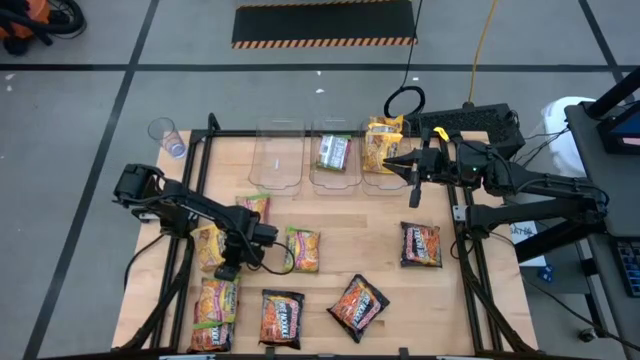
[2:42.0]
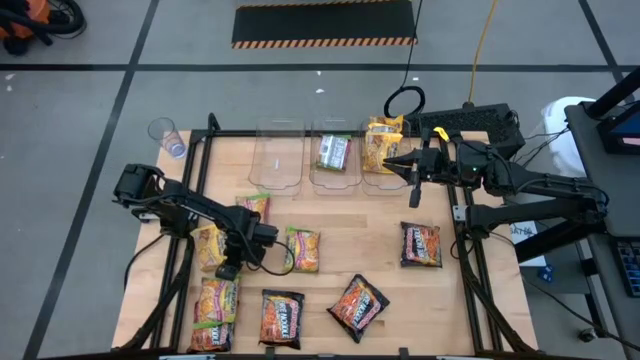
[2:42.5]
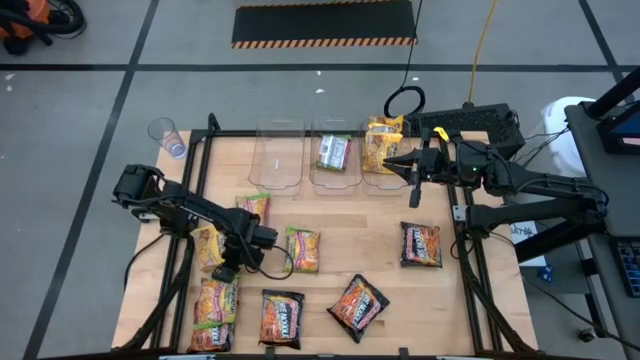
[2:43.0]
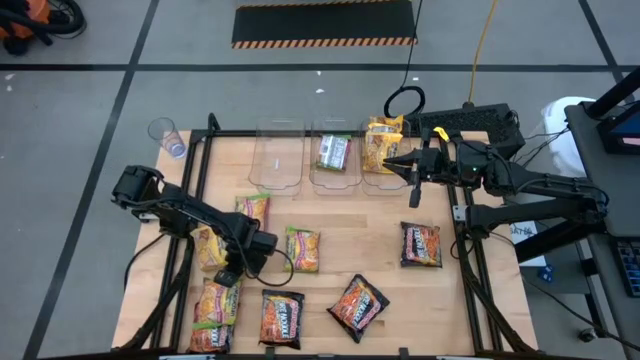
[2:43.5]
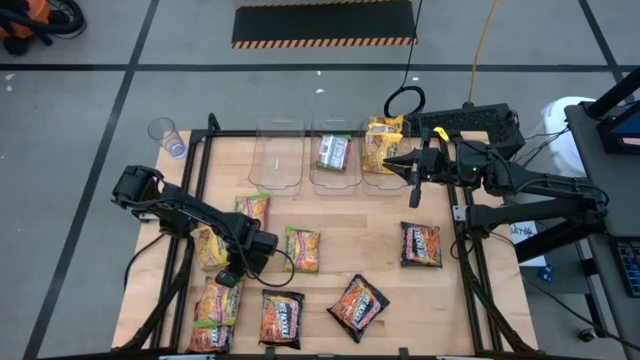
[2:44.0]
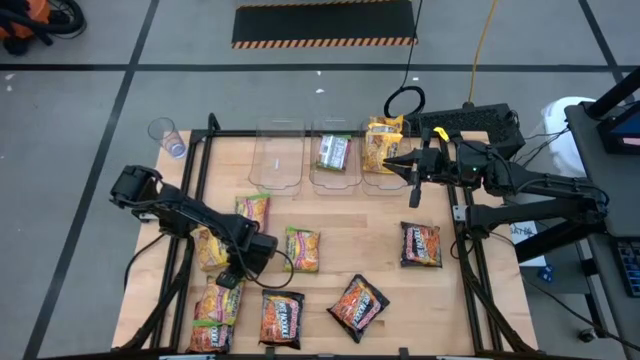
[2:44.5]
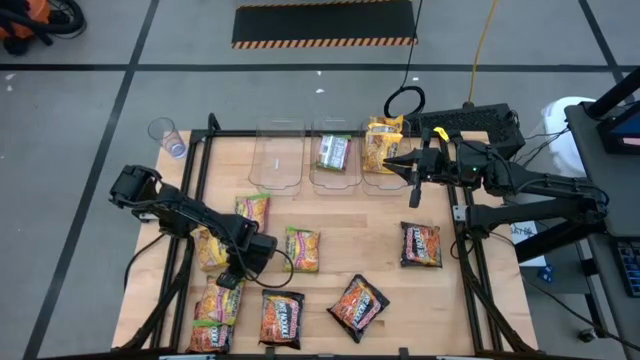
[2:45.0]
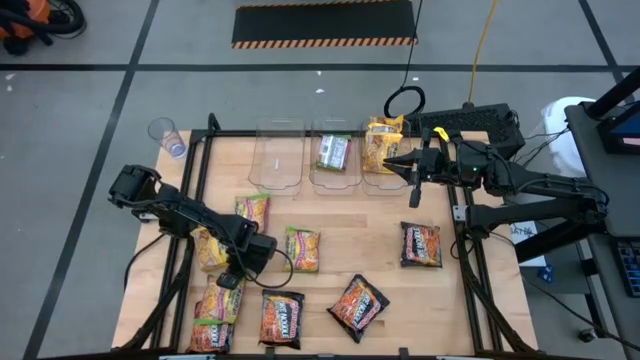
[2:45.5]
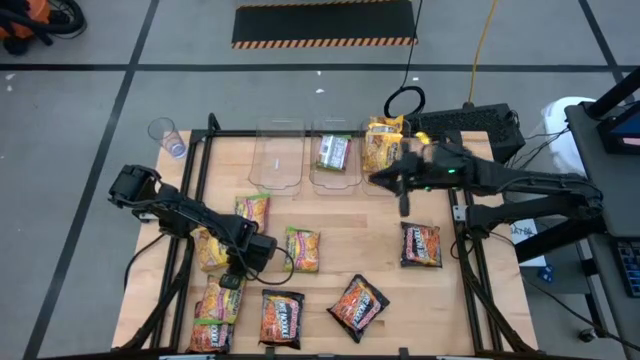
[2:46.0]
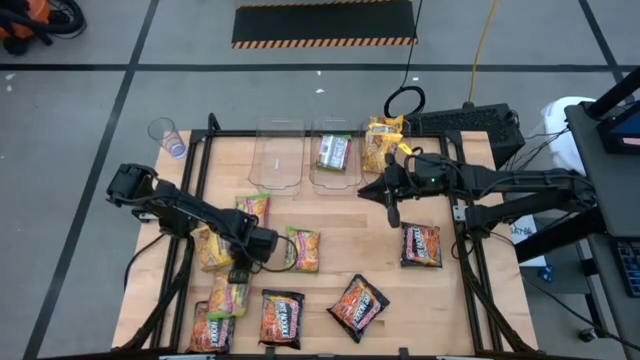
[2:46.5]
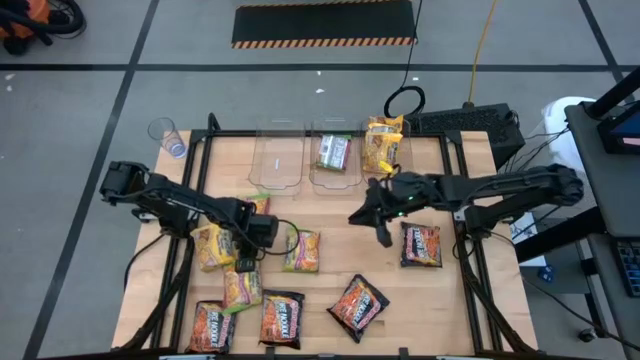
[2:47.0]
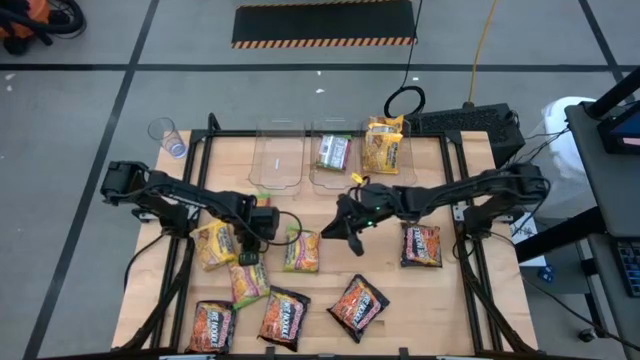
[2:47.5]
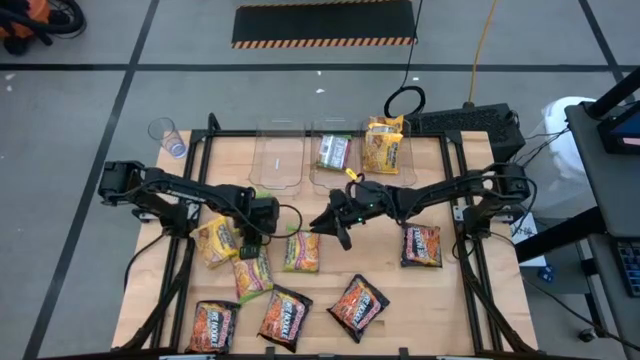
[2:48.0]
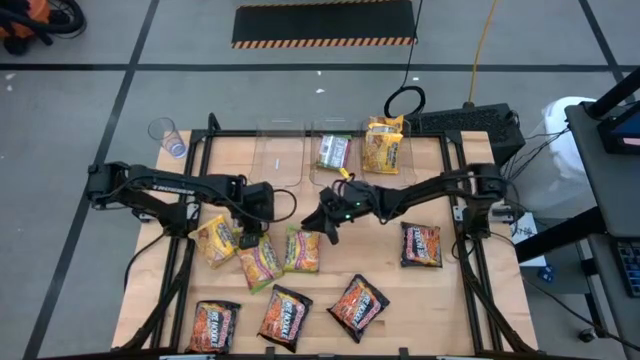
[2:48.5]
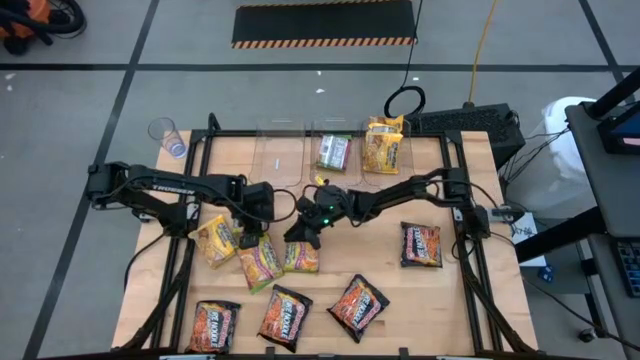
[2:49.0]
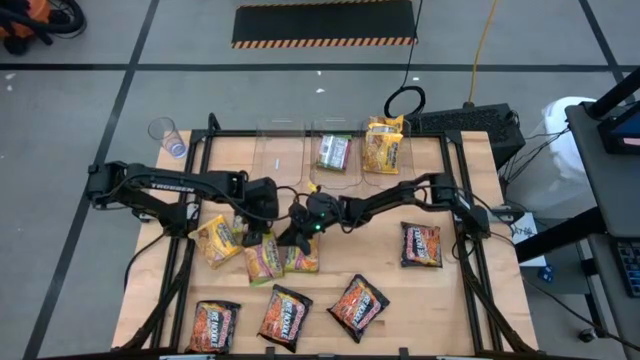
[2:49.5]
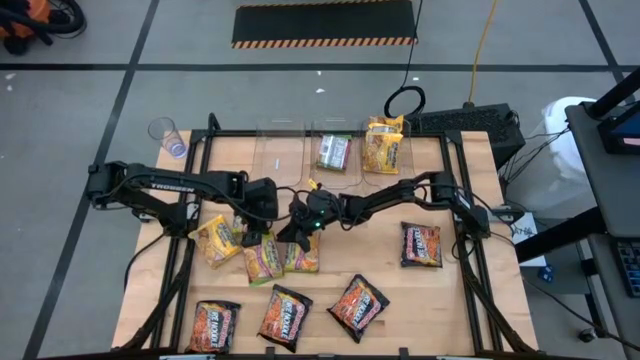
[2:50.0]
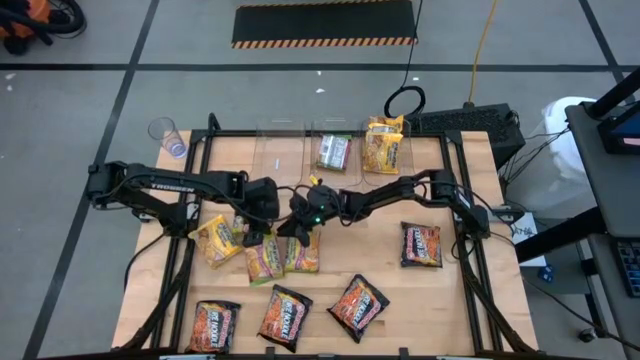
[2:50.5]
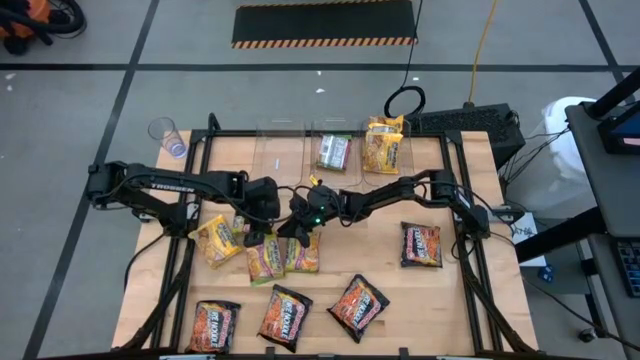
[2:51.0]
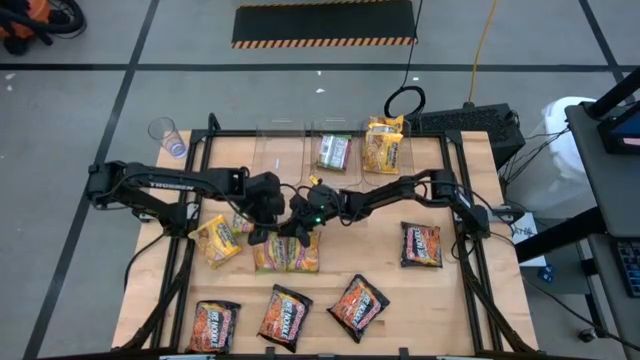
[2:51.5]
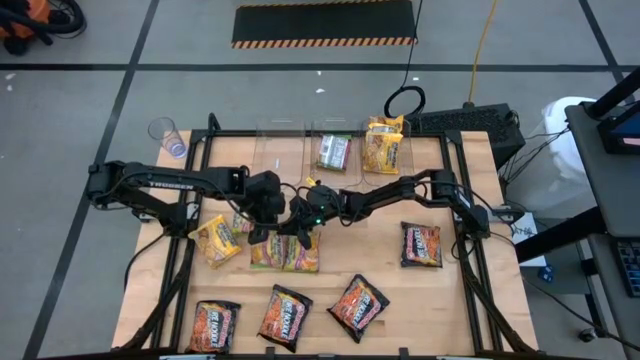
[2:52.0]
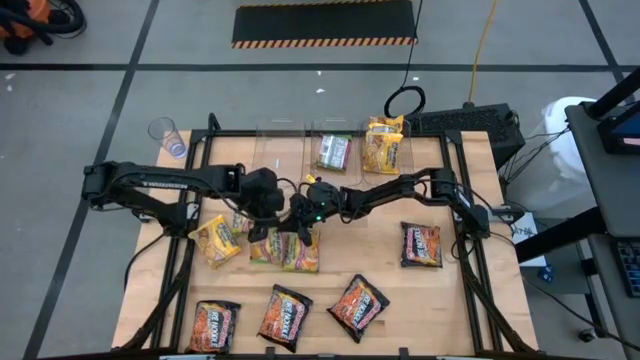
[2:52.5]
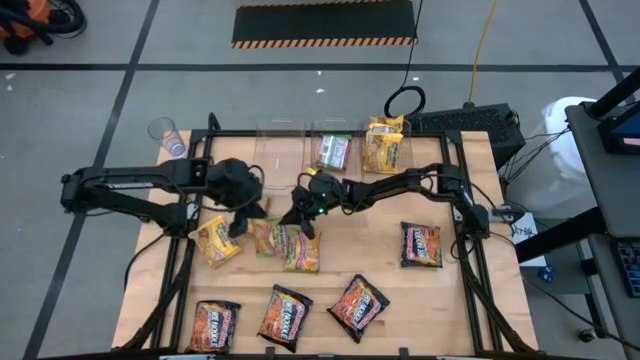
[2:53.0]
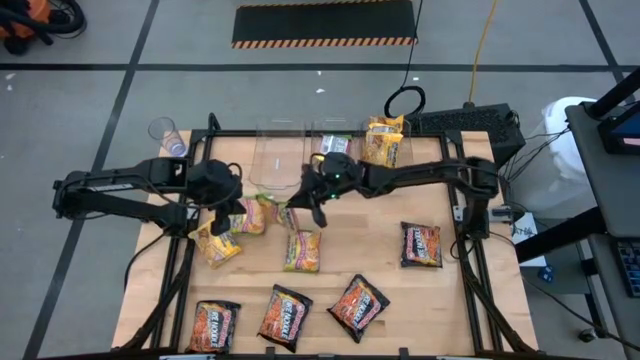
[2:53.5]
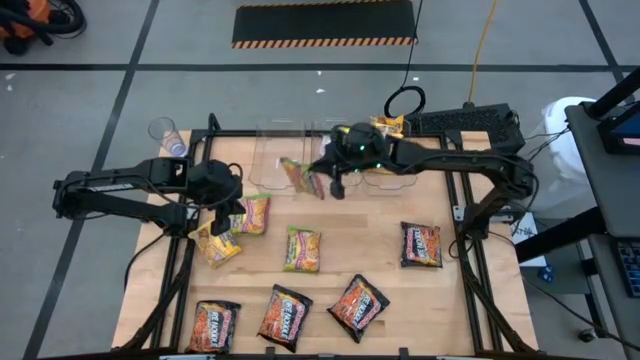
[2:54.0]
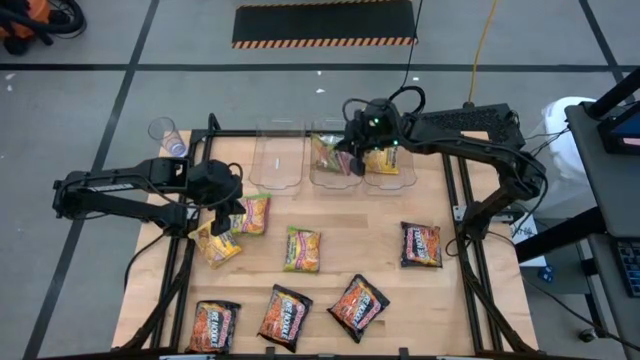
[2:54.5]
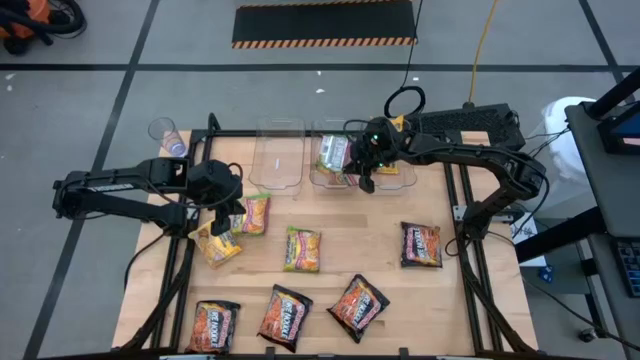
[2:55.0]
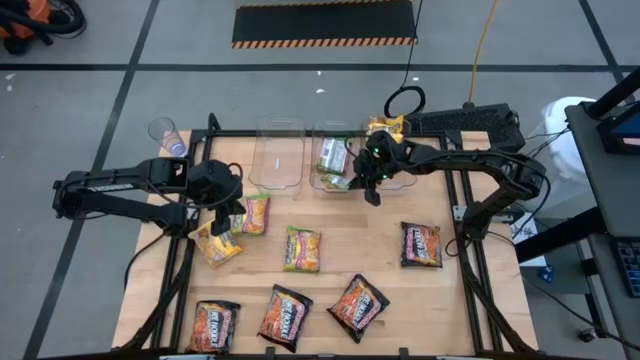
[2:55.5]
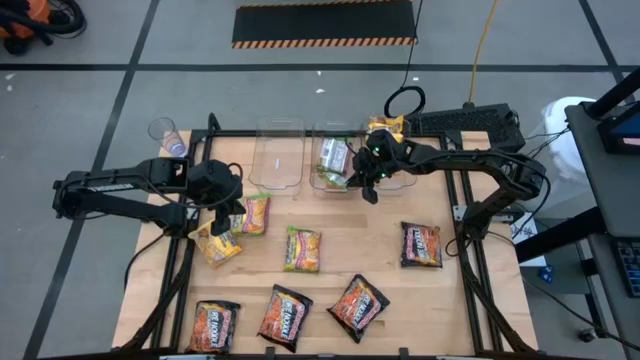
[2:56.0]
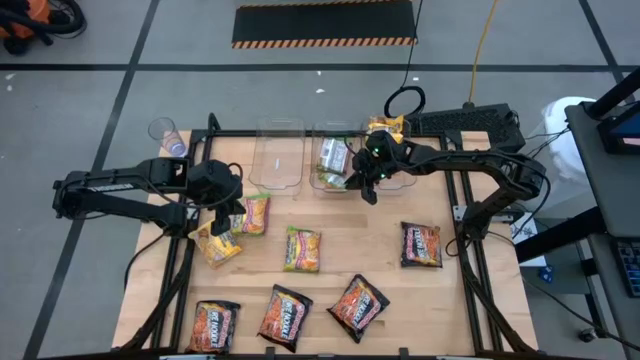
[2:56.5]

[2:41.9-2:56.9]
Task: Sort Maruchan noodles
Put the green noodle pack into the center transparent bin

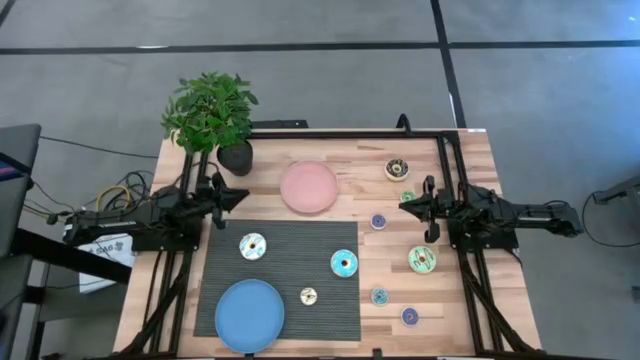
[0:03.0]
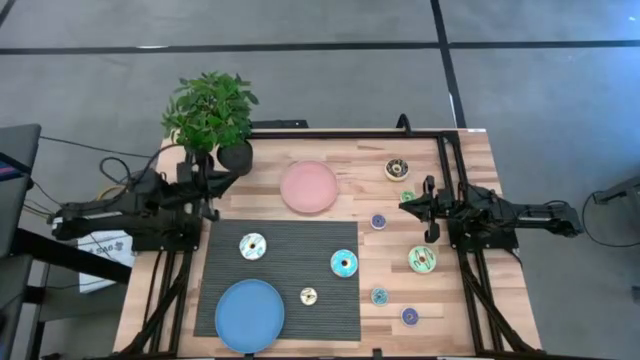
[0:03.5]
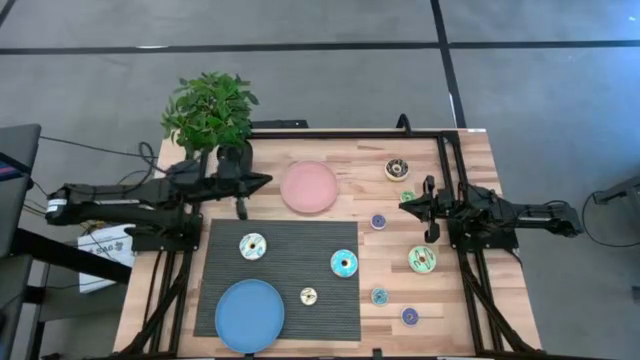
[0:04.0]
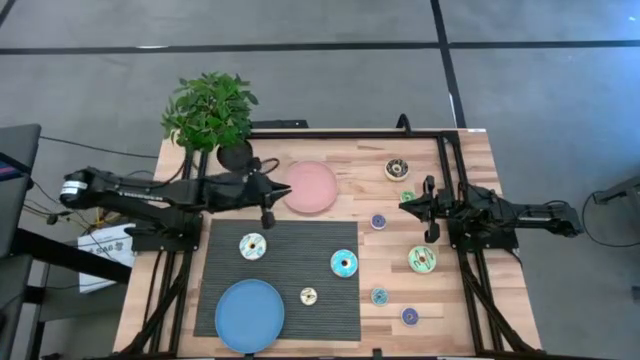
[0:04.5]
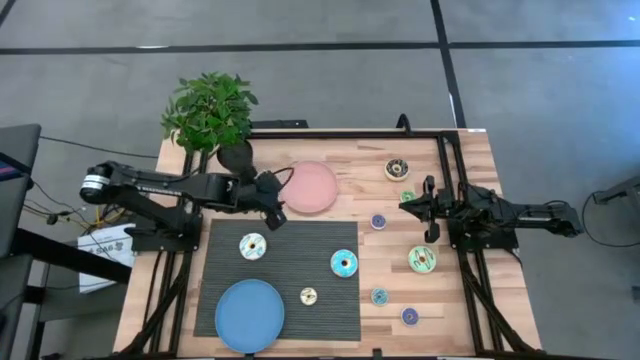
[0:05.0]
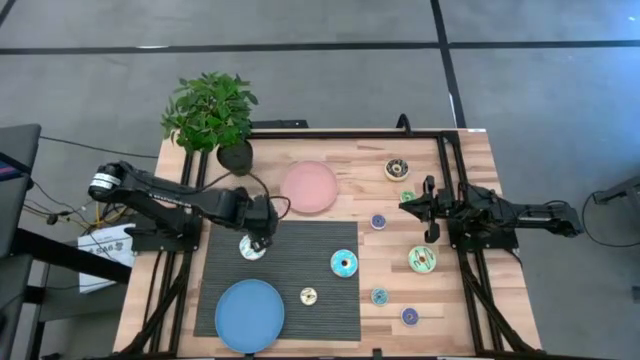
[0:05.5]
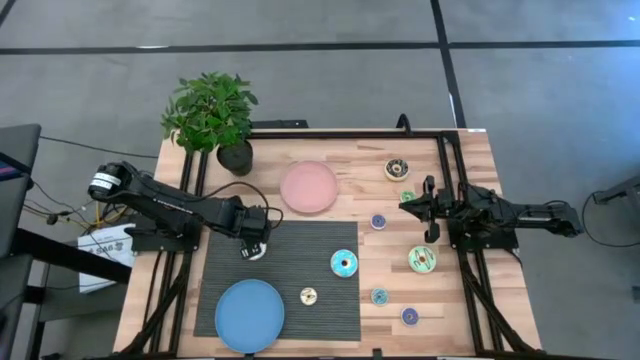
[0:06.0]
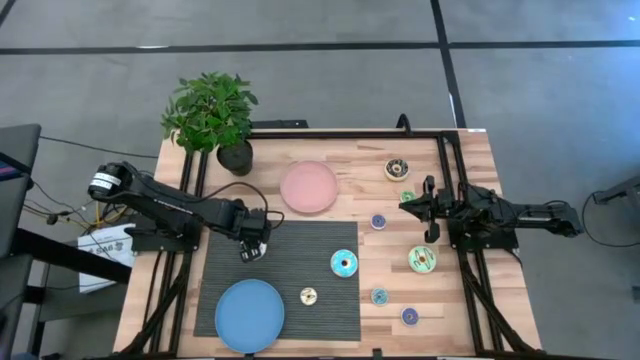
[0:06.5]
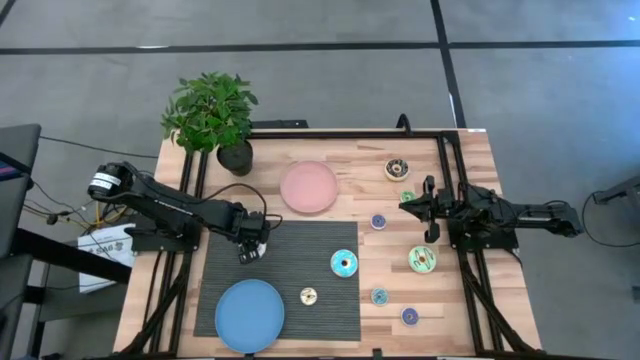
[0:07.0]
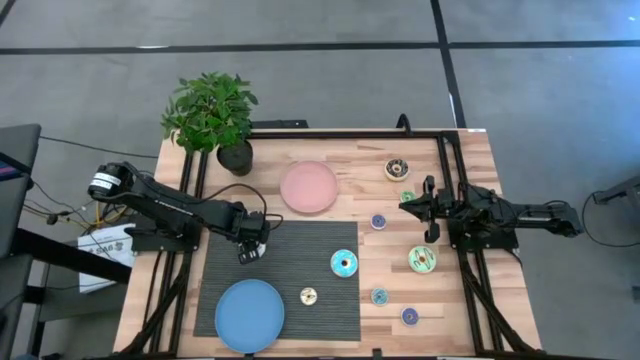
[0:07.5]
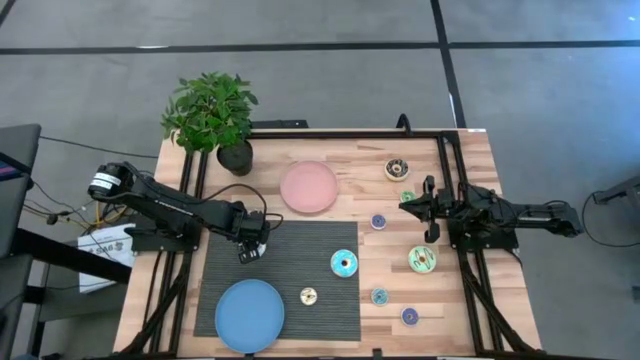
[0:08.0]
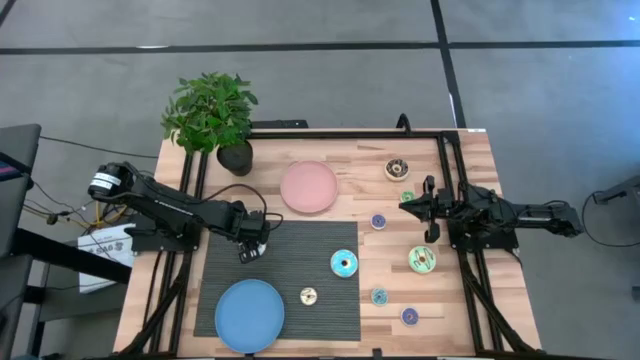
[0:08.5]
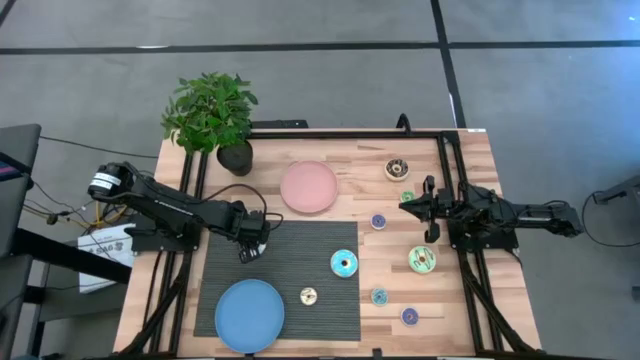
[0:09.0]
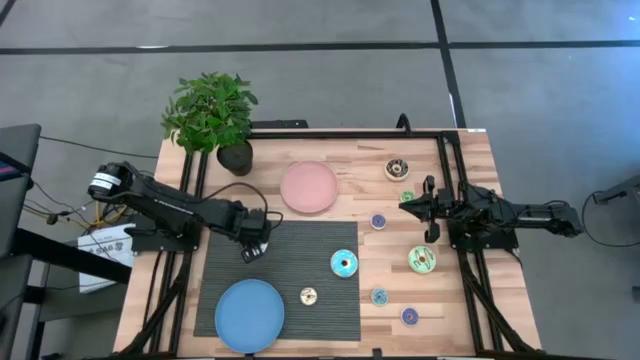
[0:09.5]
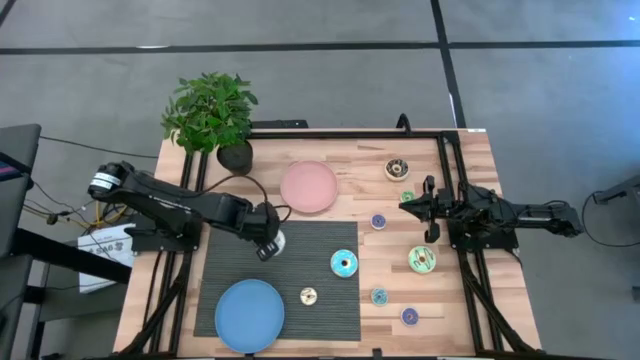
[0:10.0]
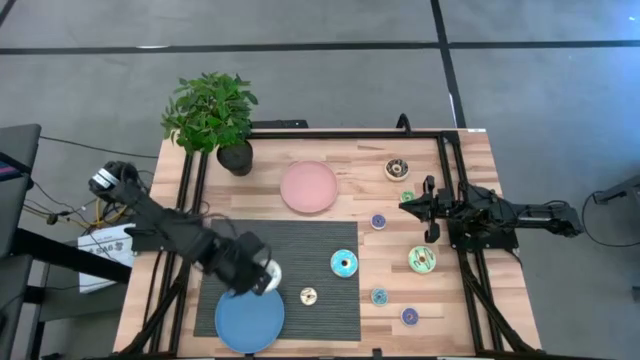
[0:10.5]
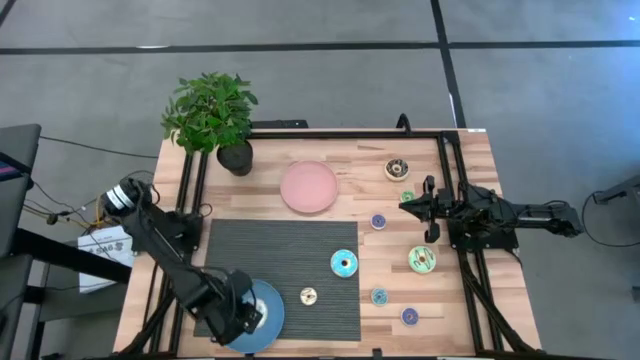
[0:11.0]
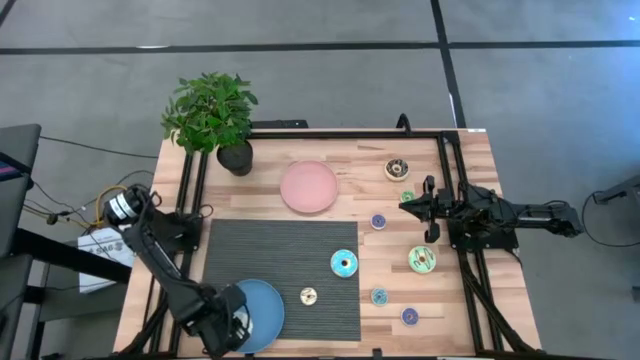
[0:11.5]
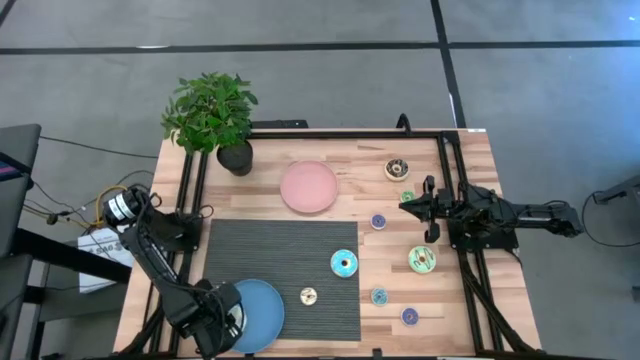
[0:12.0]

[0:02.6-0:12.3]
Task: Pick & Place donuts
Put the big white donut on the blue plate
